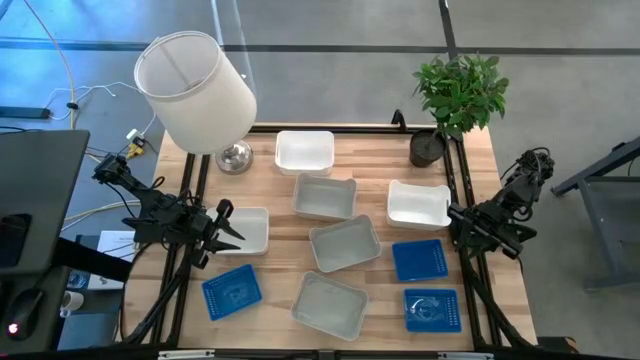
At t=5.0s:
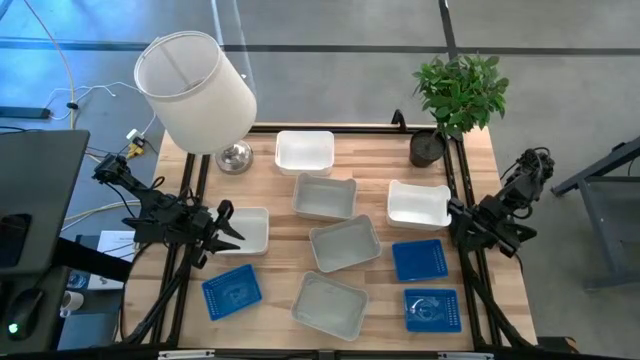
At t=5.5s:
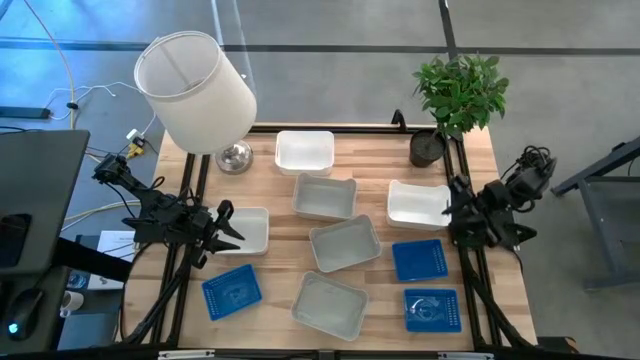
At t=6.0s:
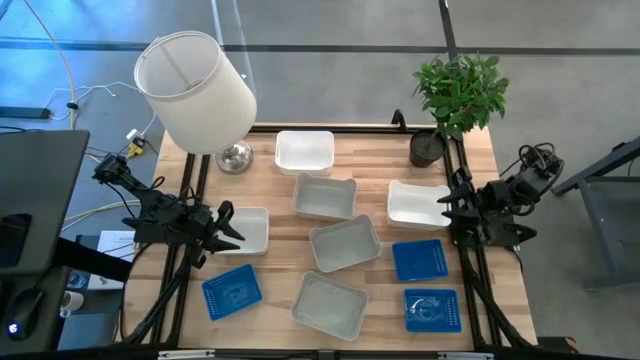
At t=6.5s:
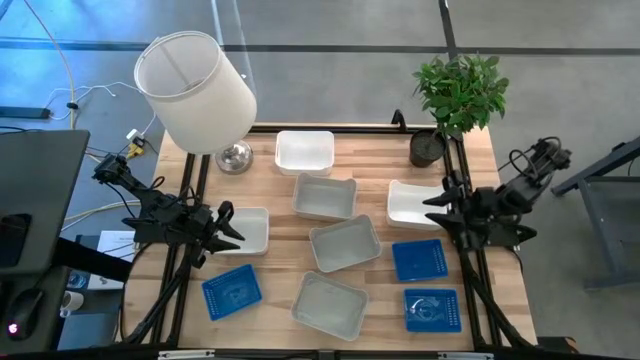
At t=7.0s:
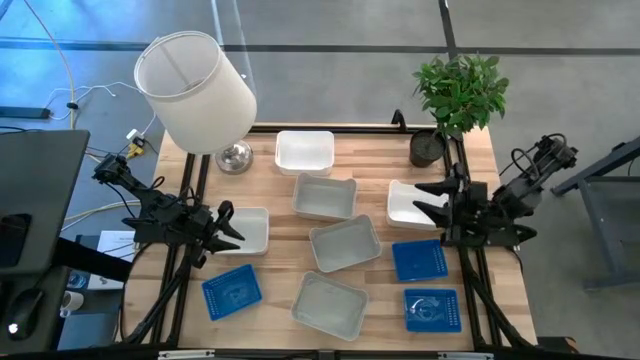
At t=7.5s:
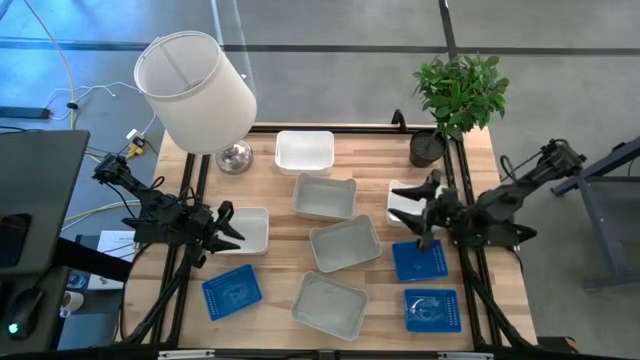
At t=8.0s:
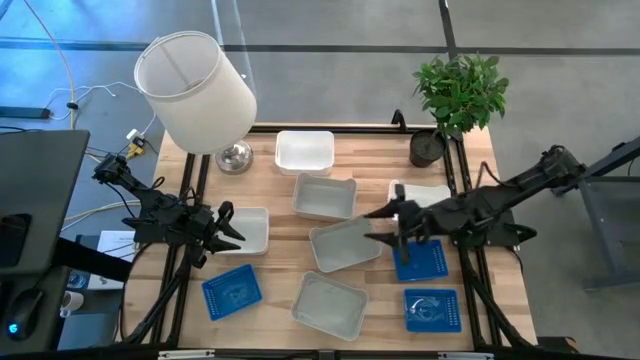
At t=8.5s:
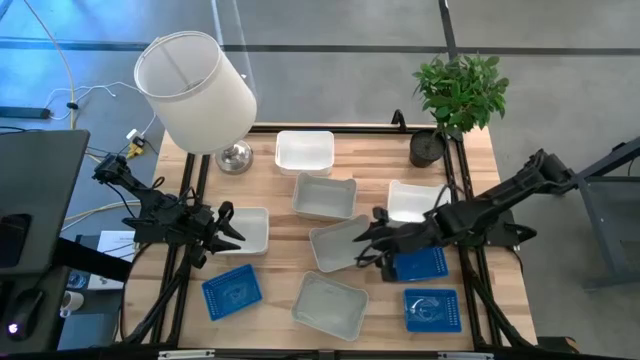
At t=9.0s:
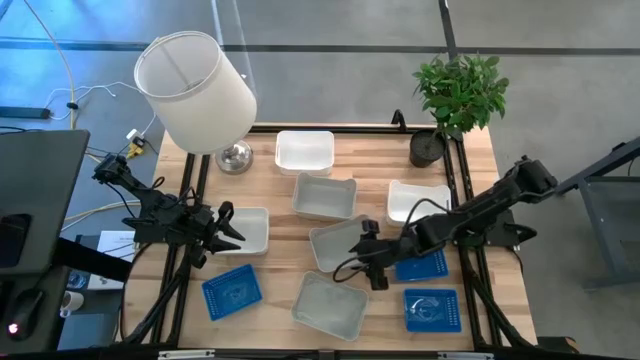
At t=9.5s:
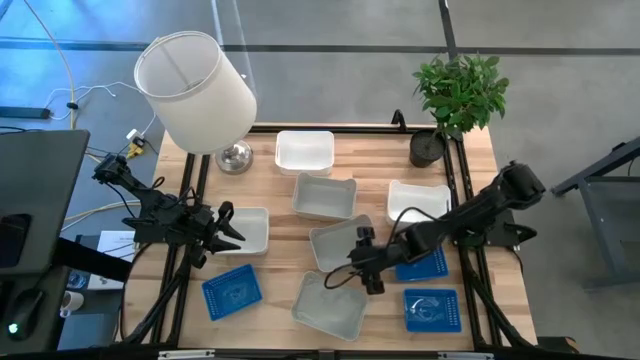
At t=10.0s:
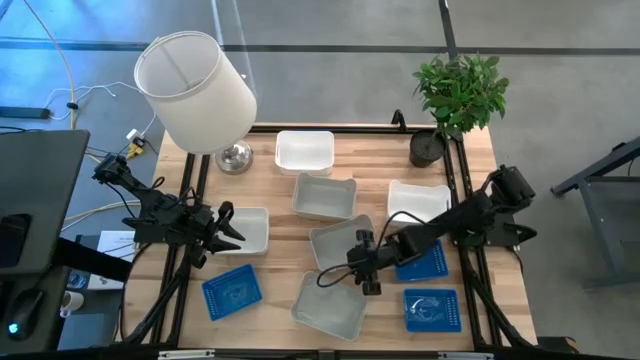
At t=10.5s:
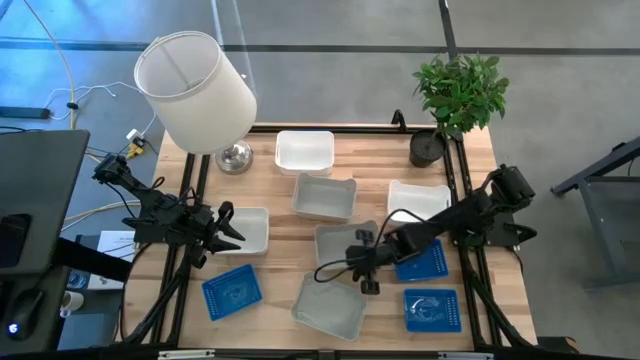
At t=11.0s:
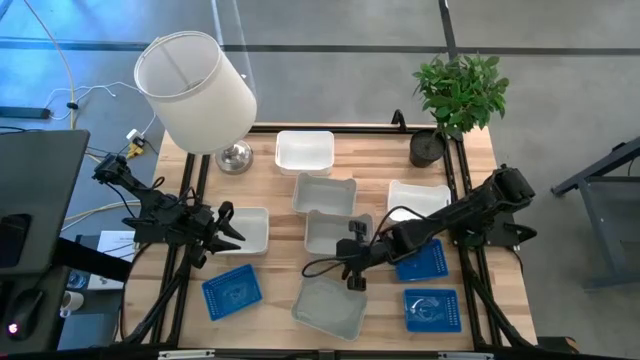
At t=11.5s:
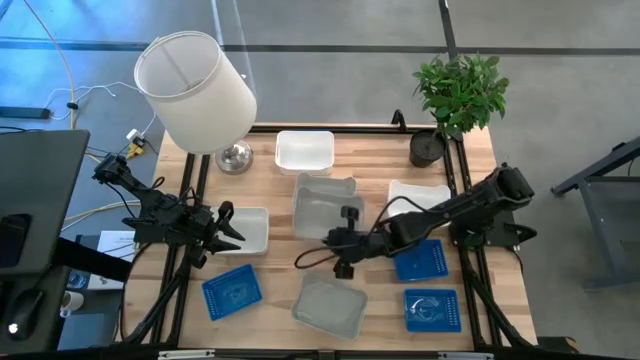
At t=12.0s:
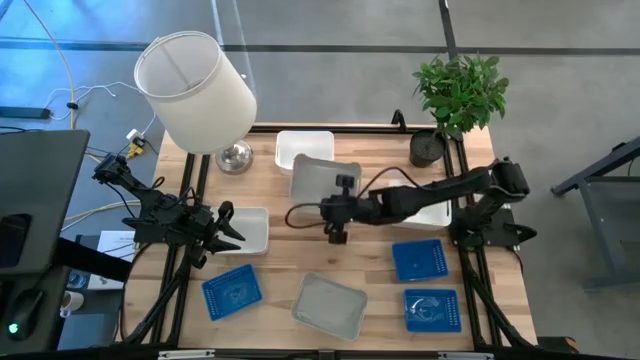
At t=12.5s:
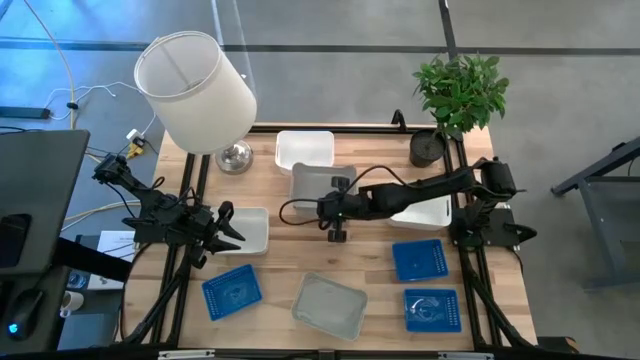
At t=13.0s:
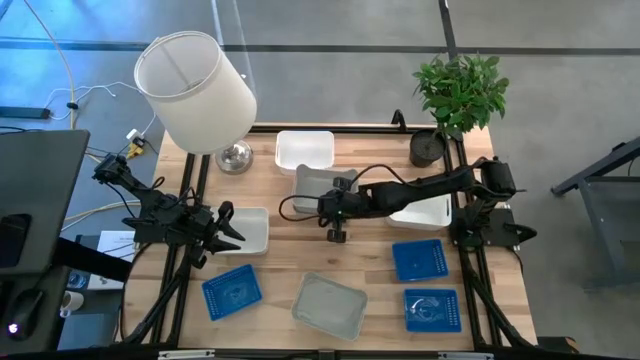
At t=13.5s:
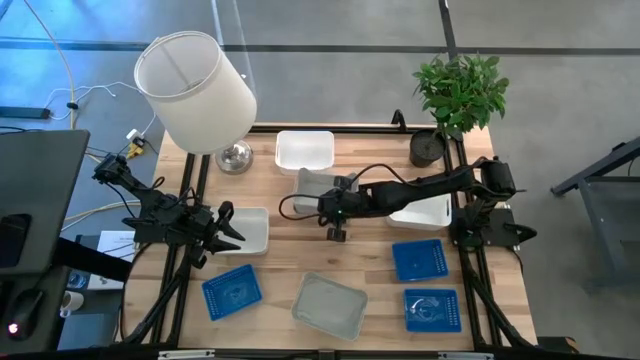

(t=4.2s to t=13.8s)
Stack the middle gray bin on top of the top gray bin

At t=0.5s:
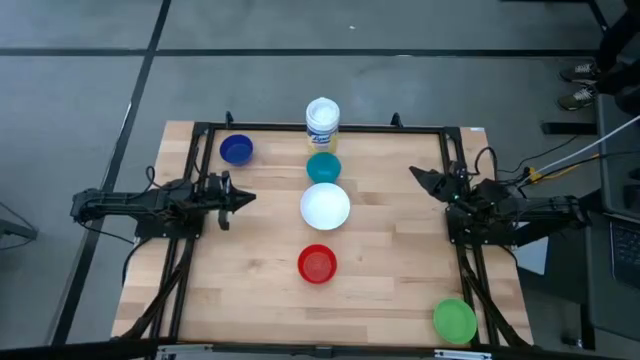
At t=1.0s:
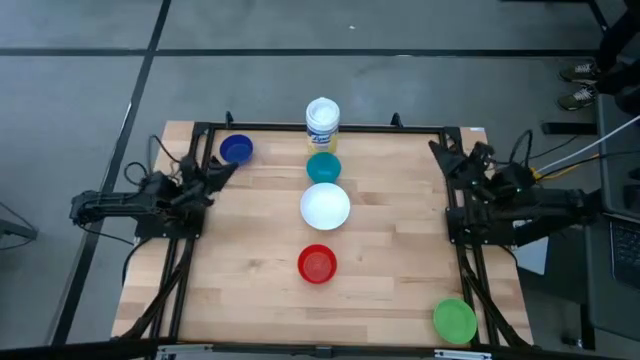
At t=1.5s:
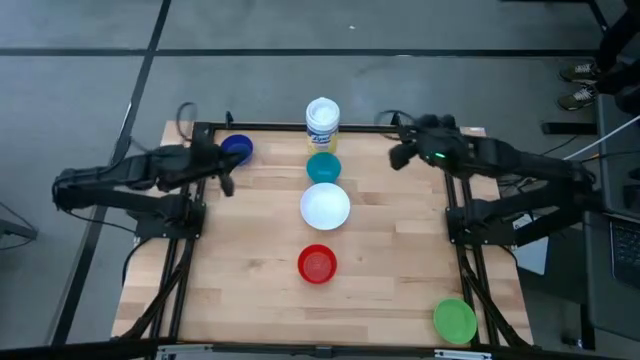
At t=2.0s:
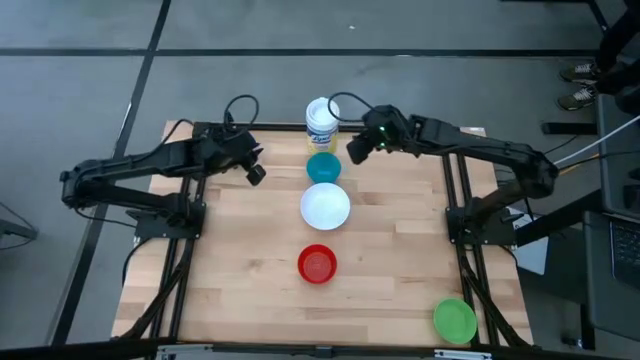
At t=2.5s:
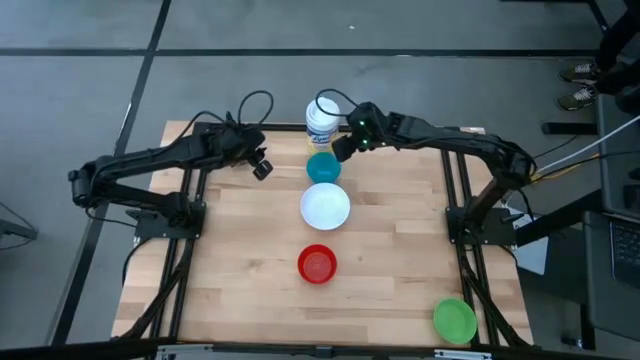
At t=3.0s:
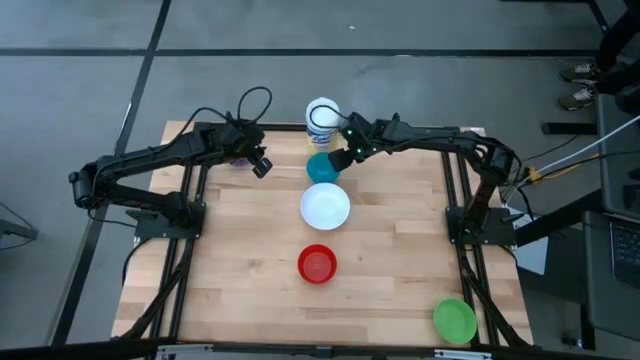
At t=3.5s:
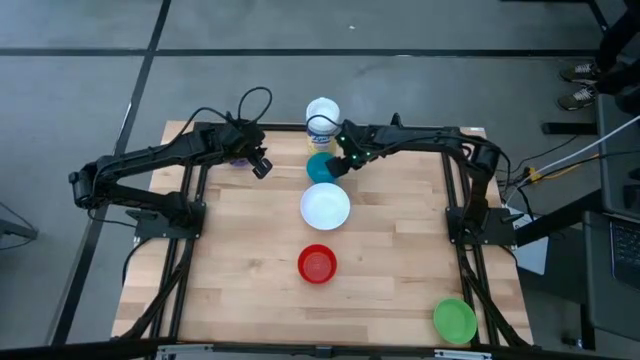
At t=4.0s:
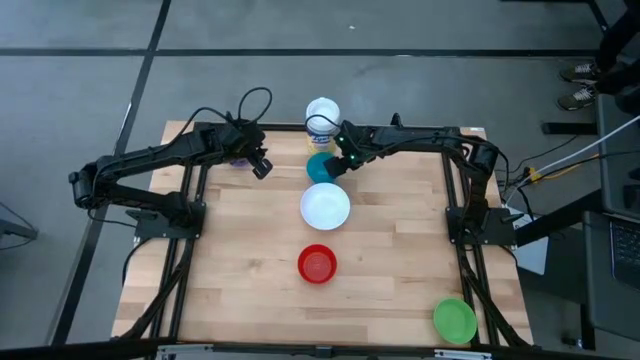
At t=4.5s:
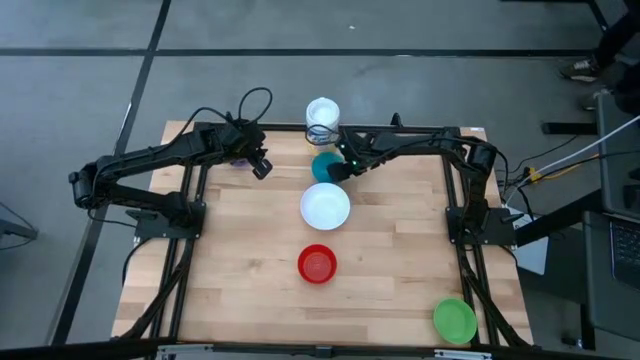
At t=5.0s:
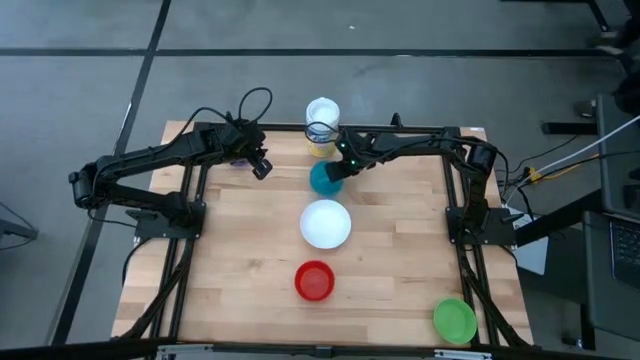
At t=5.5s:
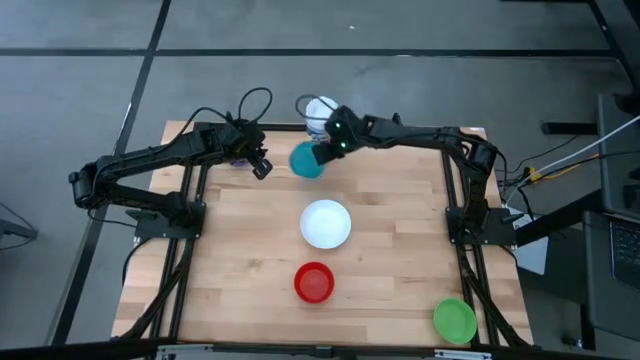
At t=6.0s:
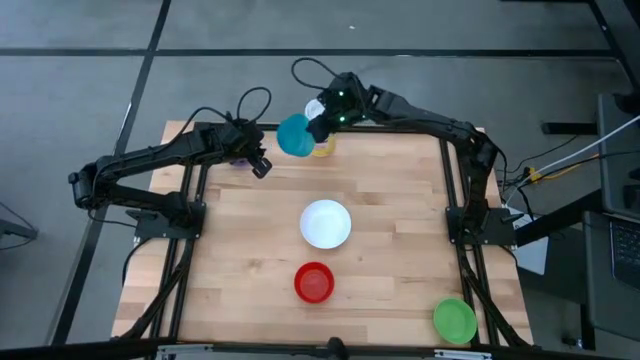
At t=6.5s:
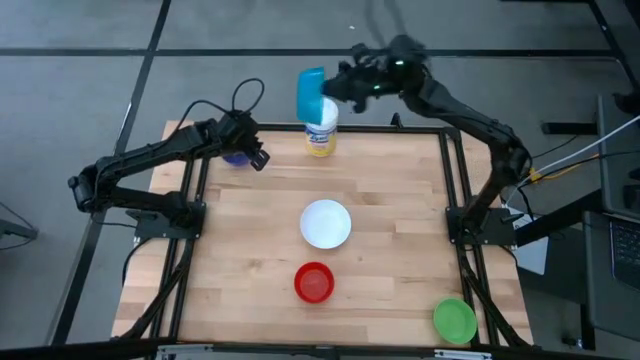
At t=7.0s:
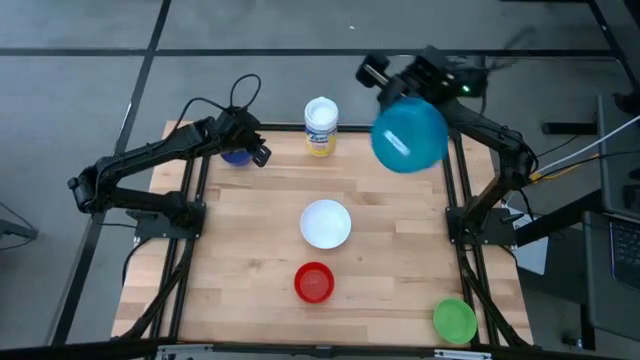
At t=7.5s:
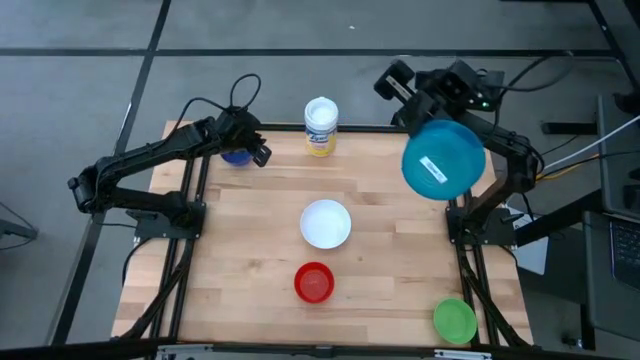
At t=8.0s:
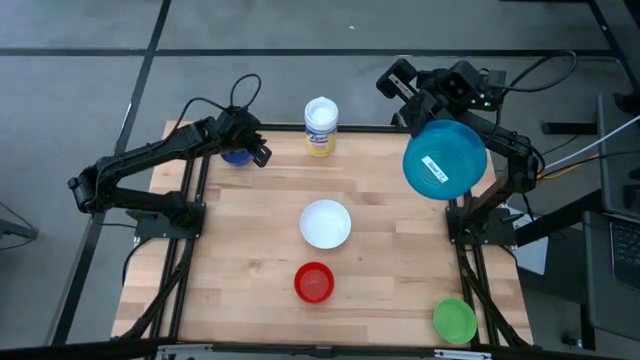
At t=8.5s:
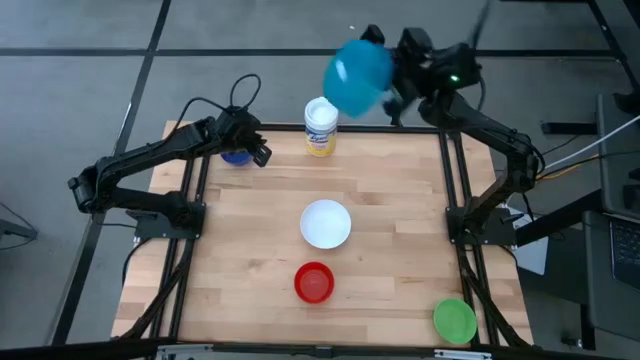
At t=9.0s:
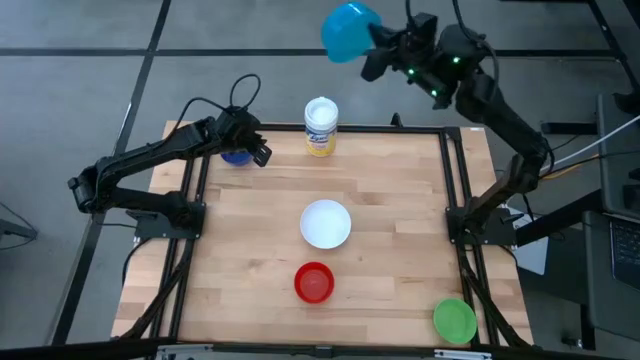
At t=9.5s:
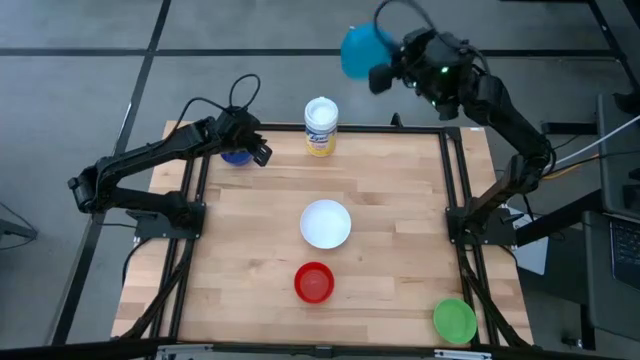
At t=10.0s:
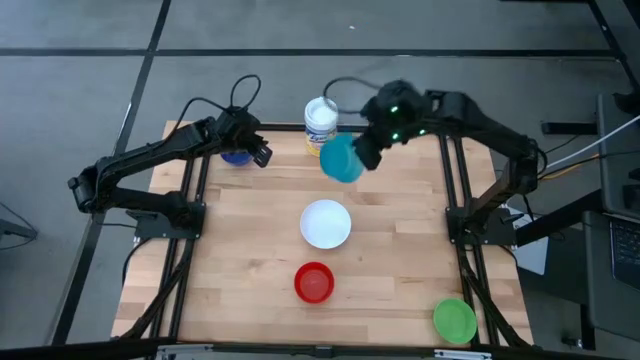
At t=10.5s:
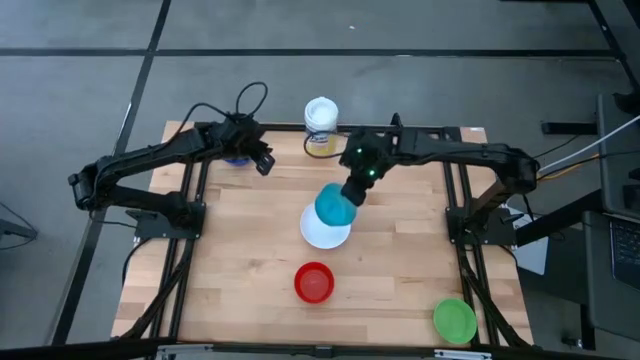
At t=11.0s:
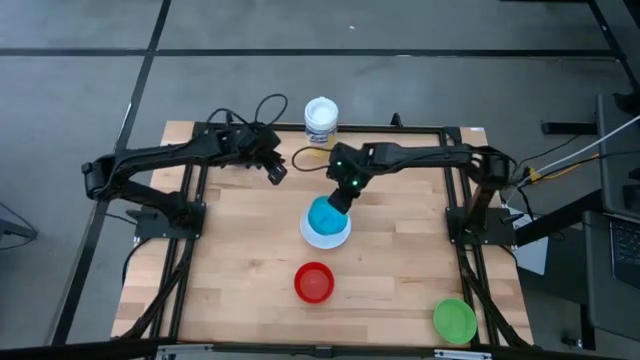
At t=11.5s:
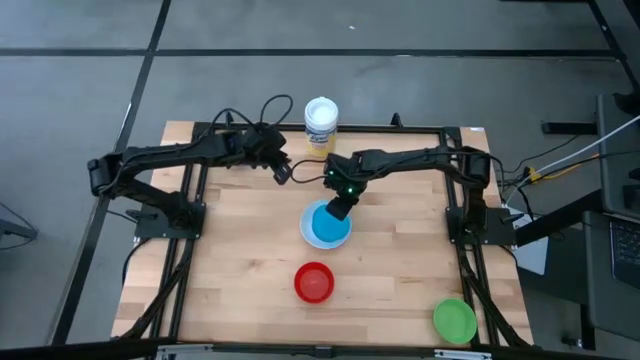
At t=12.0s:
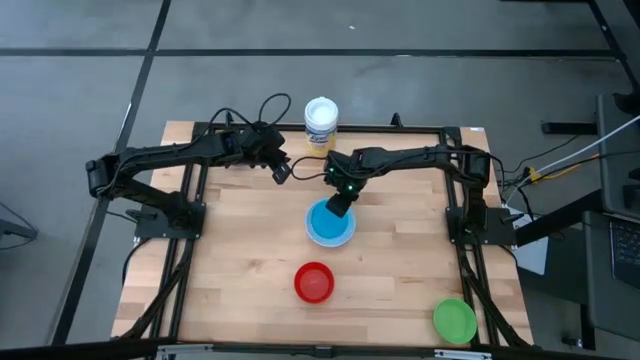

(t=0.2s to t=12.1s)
Stack the light blue bowl on top of the white bowl
